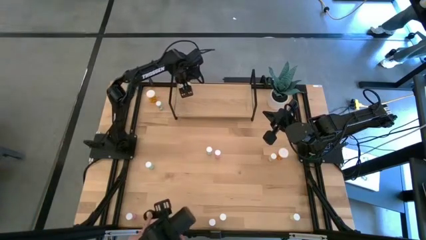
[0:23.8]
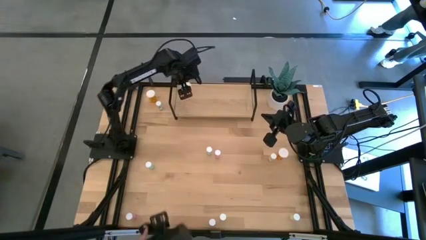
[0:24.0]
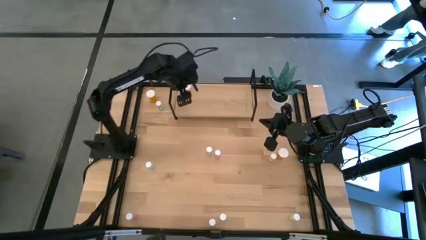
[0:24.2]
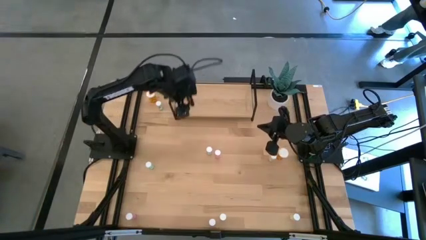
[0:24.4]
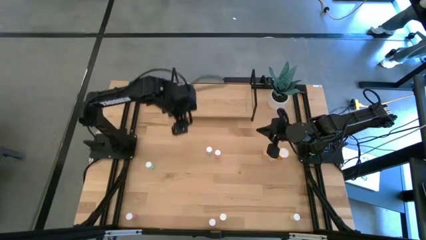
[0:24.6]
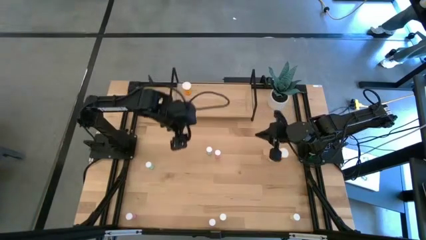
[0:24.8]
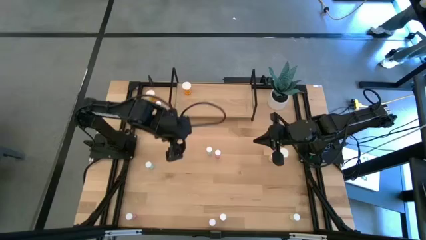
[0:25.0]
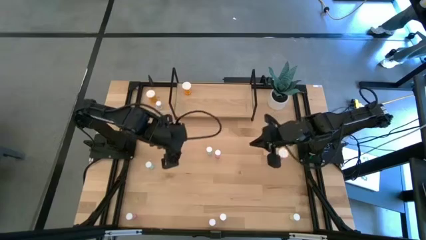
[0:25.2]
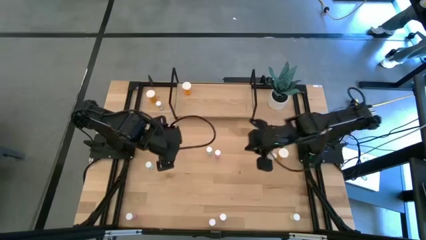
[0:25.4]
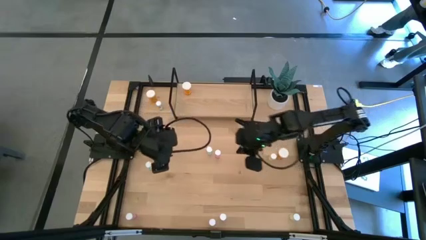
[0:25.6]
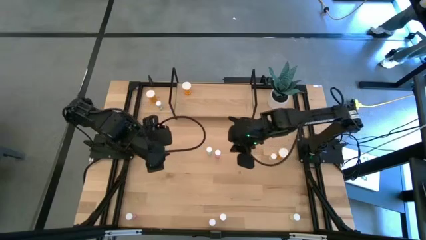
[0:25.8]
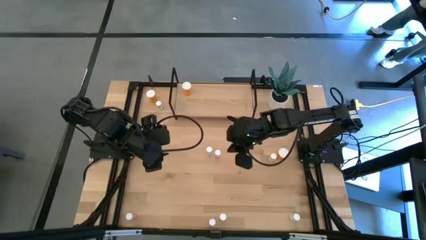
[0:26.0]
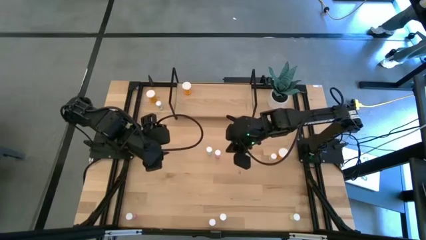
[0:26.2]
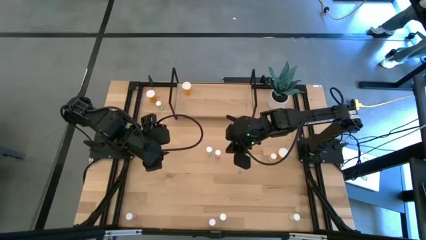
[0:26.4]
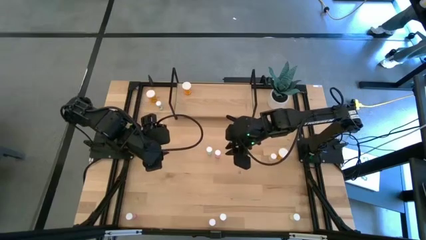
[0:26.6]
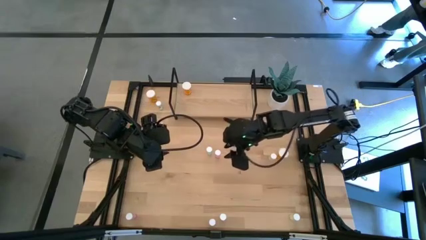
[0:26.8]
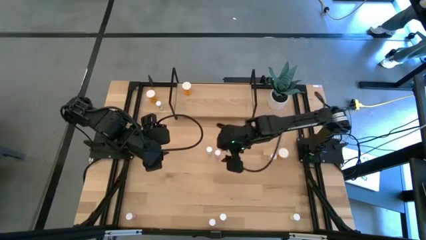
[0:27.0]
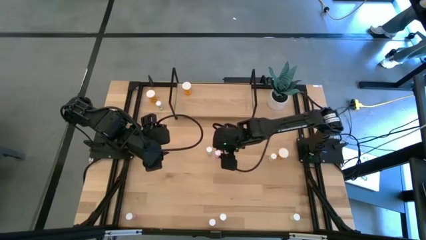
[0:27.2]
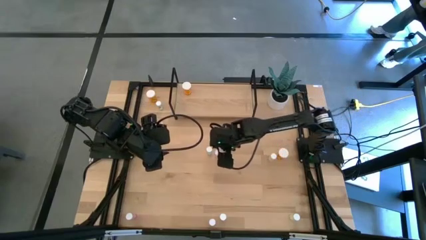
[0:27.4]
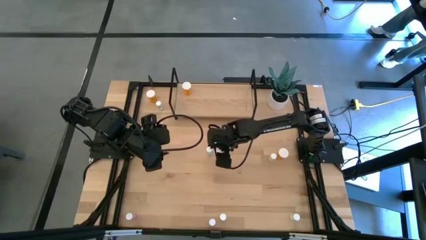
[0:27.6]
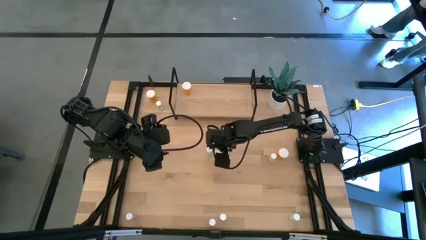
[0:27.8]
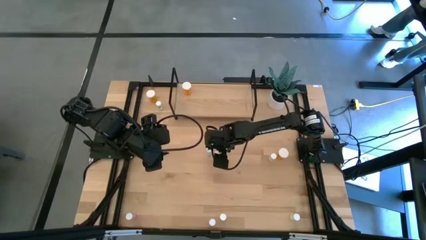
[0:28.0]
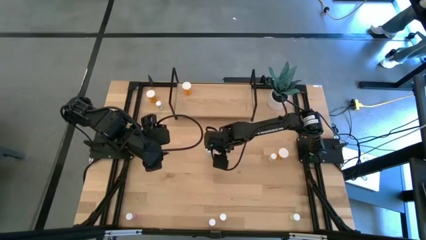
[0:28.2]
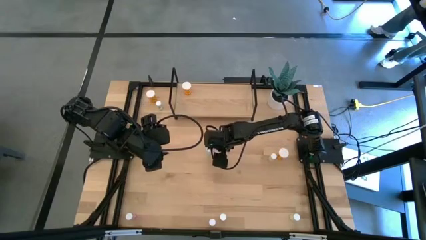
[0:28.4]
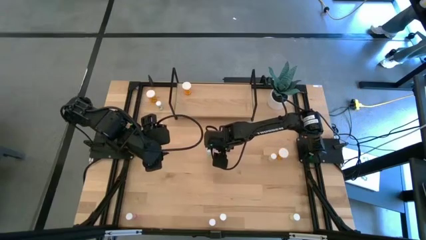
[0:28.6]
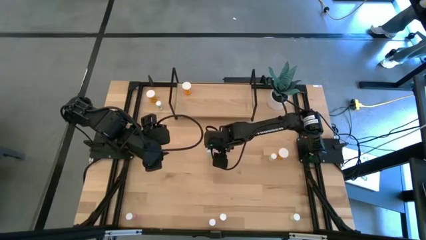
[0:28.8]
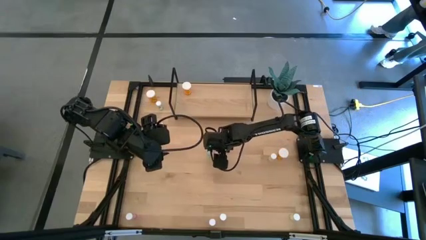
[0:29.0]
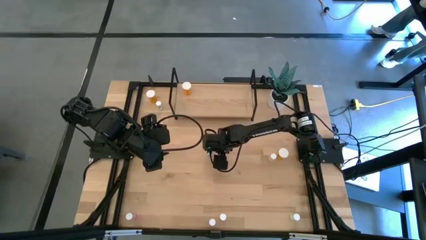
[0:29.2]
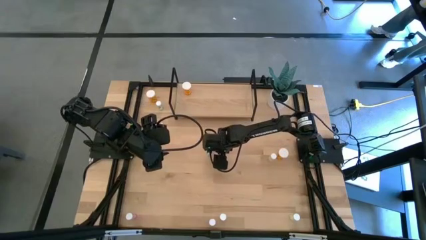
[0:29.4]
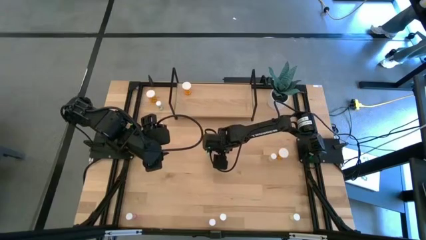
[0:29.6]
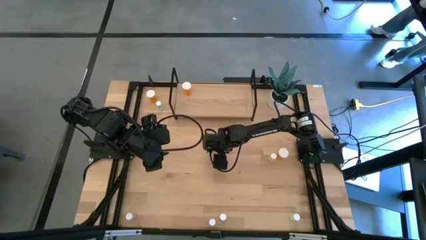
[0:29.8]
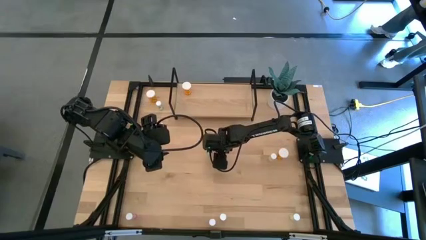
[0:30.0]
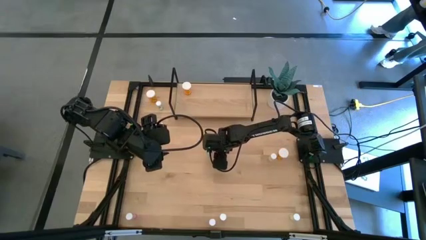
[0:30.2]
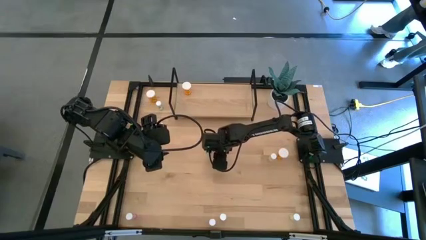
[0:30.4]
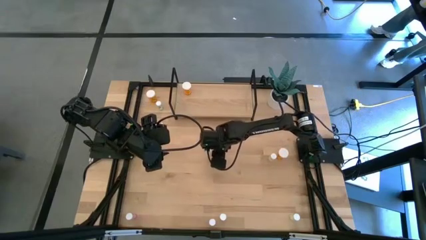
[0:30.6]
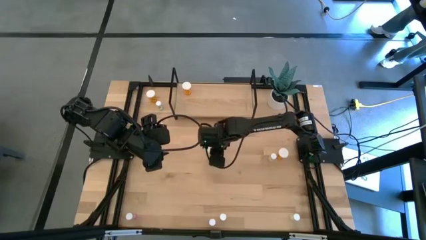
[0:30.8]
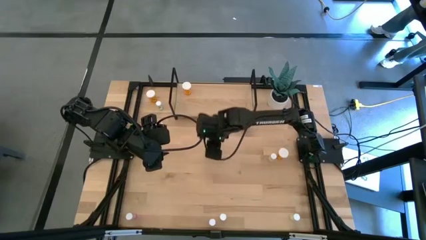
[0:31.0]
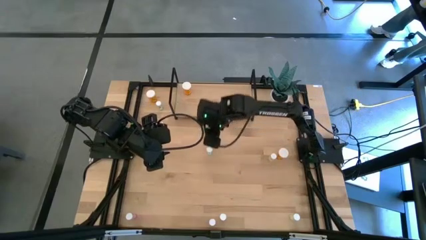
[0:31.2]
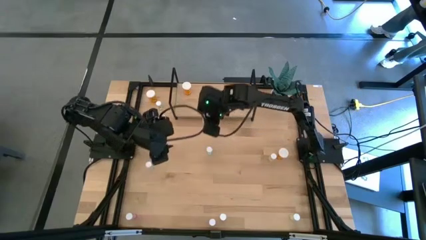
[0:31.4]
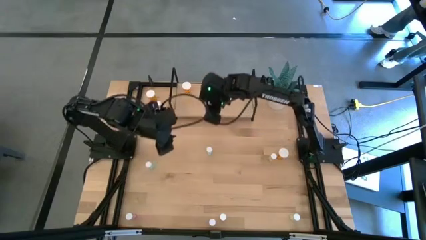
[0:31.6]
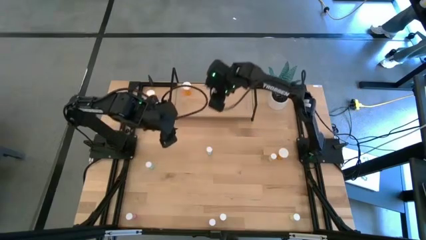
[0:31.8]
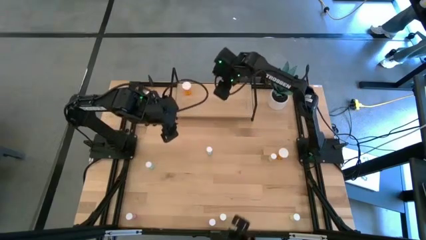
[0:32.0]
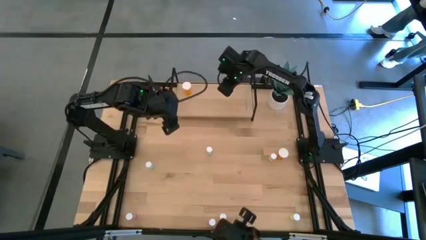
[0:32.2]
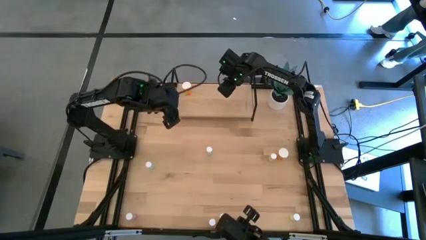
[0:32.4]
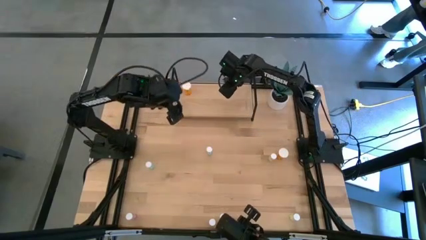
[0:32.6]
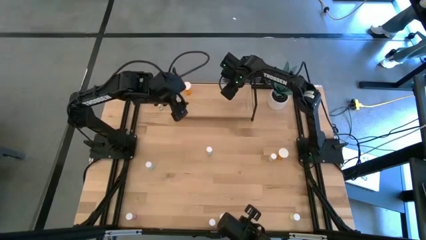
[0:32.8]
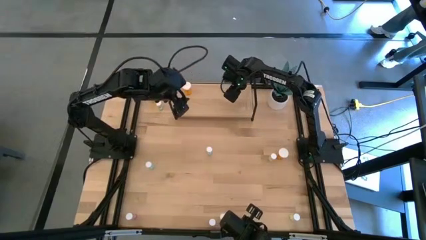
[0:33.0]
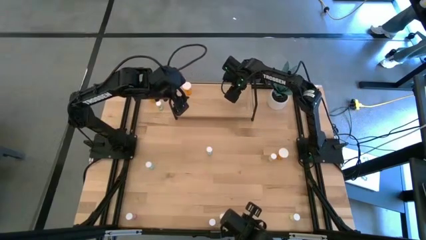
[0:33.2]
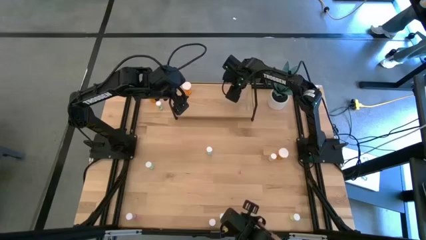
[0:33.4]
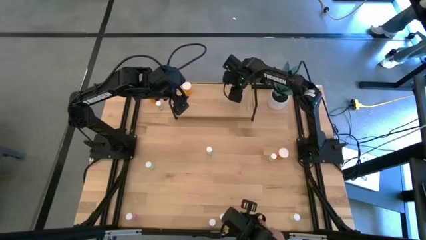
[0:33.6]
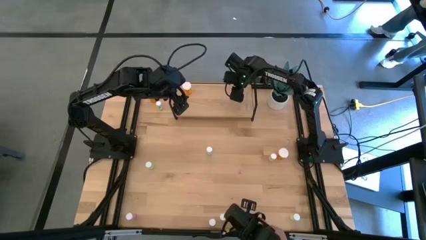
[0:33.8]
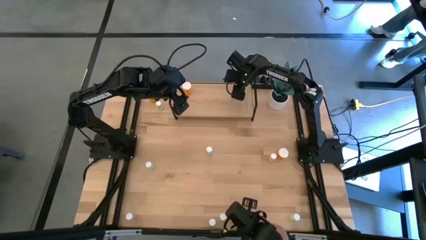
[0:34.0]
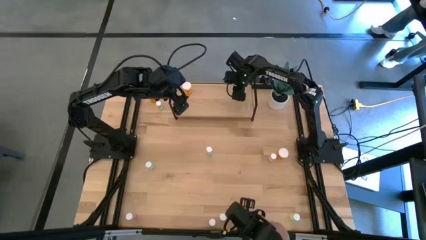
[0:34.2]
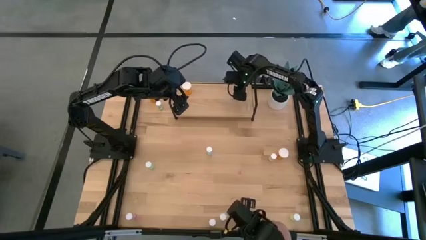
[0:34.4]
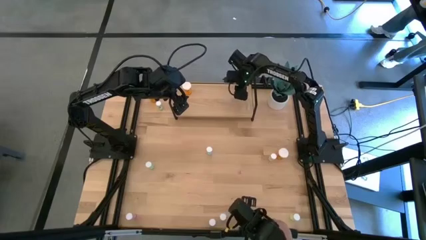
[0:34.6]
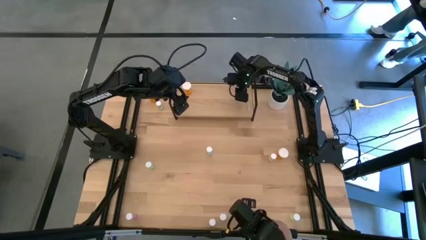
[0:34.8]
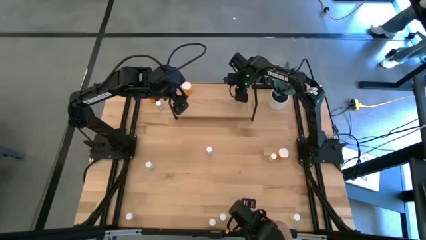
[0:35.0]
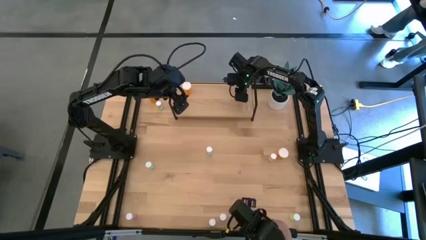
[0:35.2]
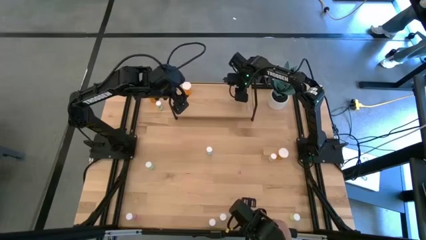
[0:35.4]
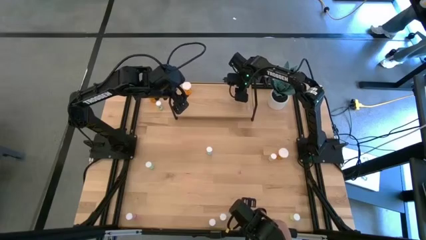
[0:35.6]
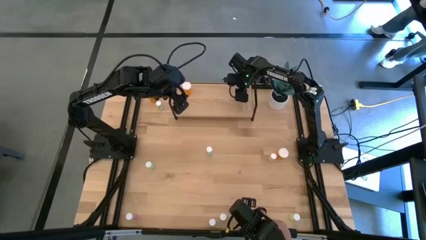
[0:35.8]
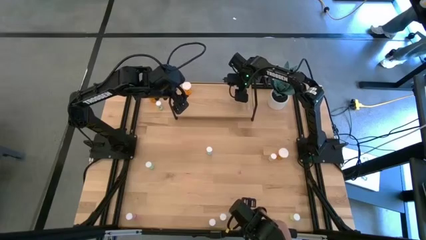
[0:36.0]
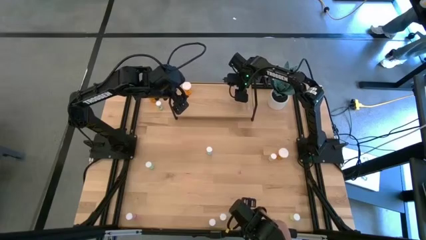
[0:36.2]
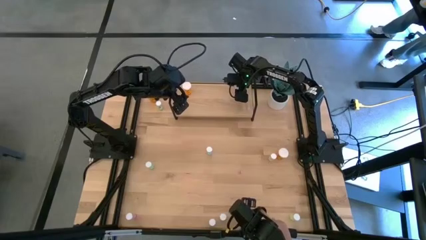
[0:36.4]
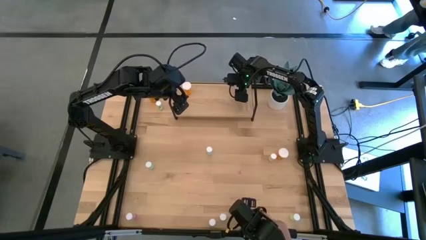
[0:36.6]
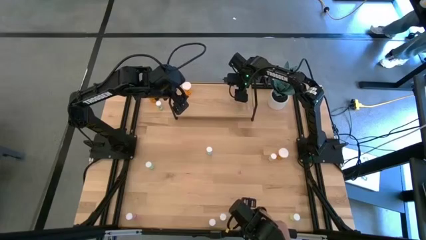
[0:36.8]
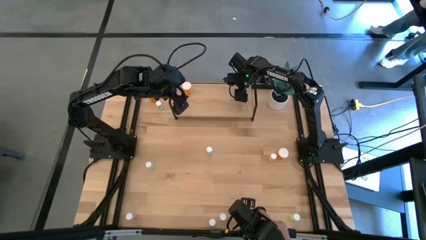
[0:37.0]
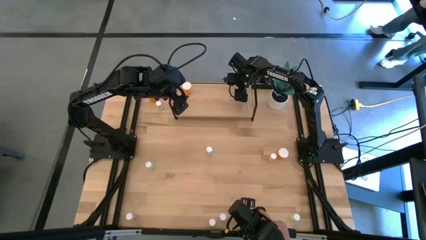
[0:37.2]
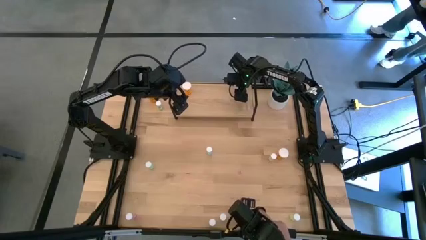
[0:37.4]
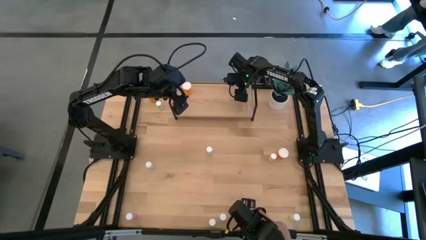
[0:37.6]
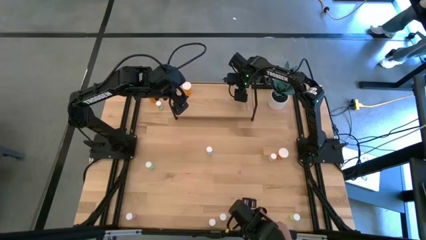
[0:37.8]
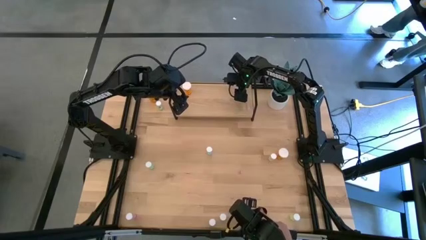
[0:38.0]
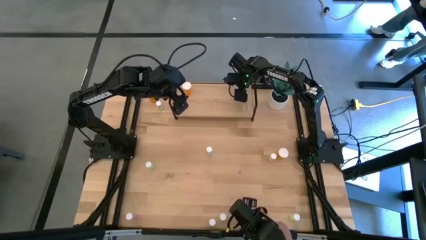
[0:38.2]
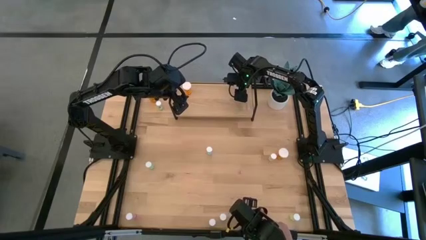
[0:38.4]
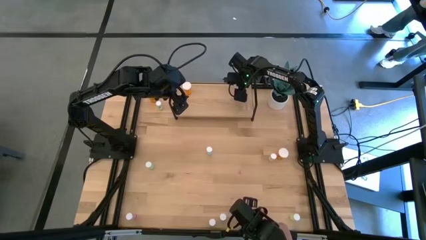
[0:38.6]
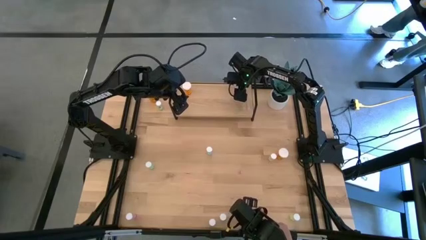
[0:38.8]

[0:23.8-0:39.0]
Task: Pick and place medicine bottles onto shelf by color
Put the top pink pill bottle on the shelf
